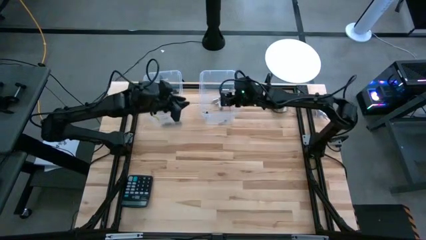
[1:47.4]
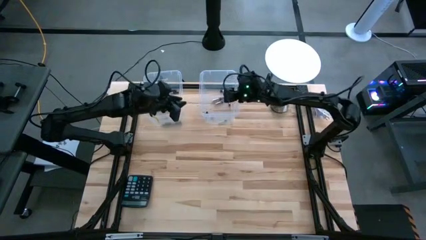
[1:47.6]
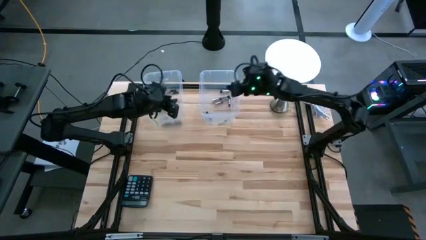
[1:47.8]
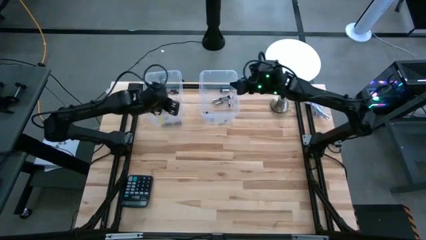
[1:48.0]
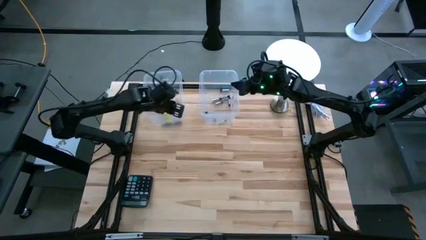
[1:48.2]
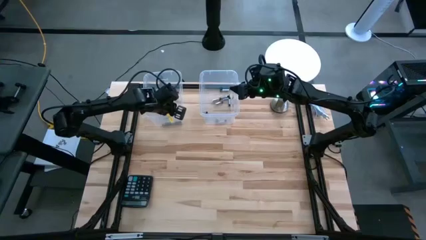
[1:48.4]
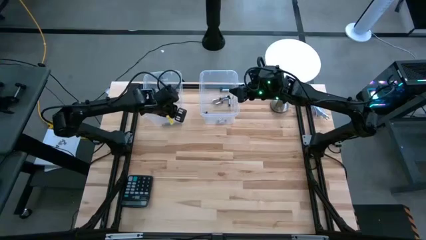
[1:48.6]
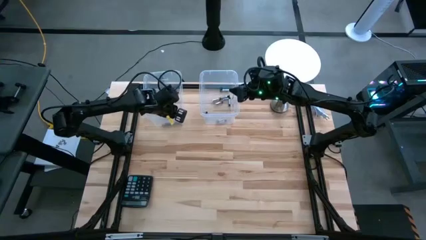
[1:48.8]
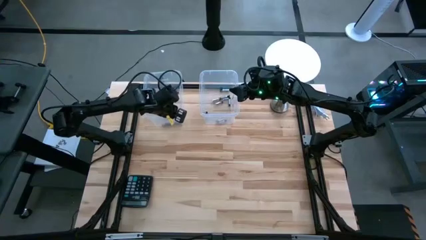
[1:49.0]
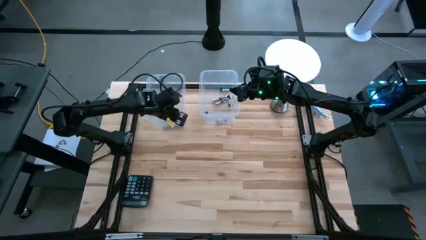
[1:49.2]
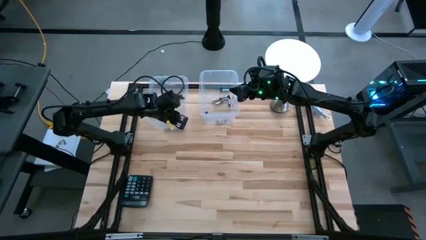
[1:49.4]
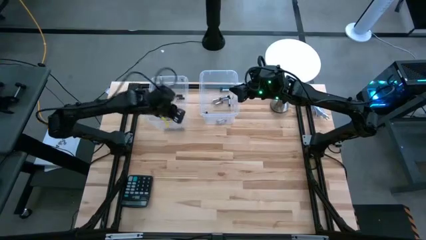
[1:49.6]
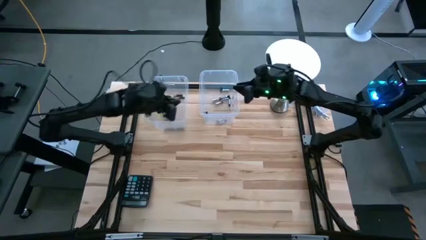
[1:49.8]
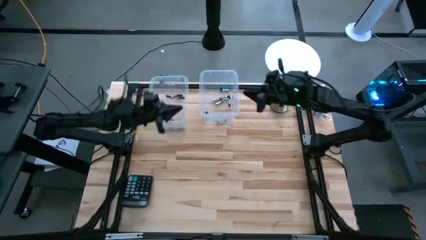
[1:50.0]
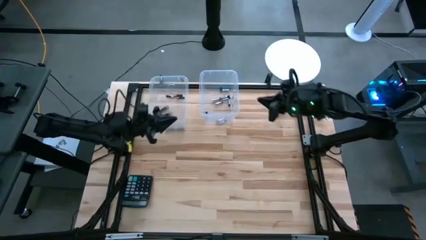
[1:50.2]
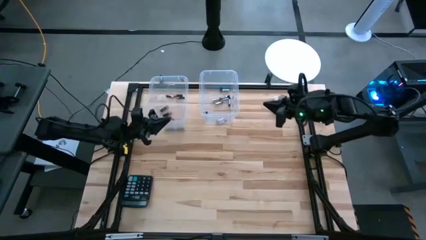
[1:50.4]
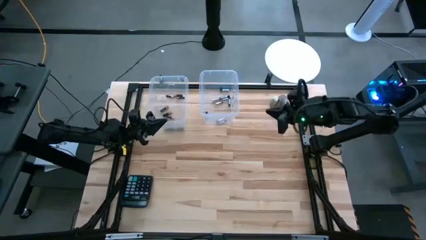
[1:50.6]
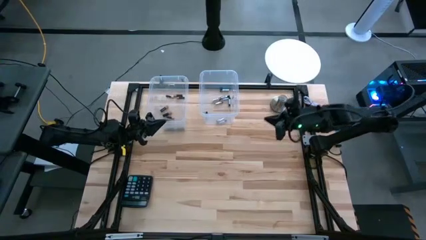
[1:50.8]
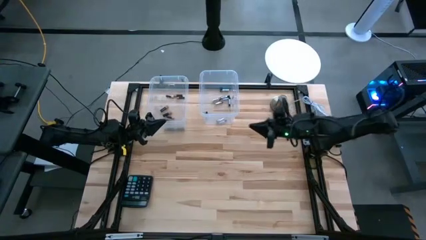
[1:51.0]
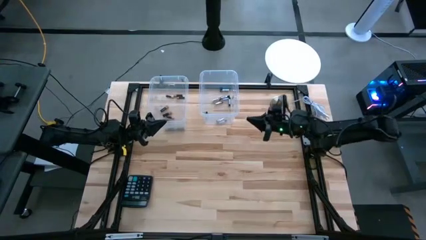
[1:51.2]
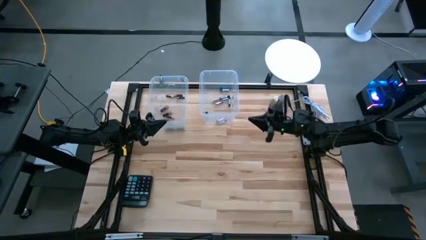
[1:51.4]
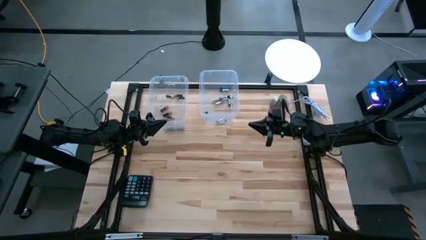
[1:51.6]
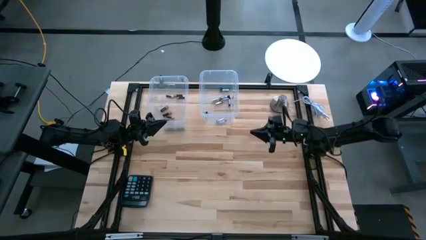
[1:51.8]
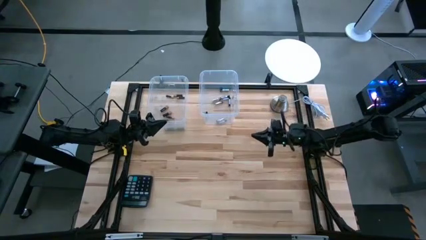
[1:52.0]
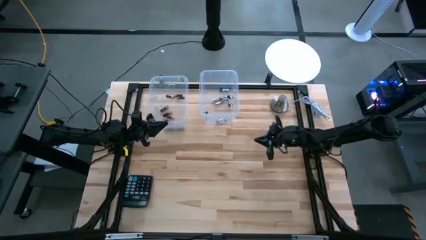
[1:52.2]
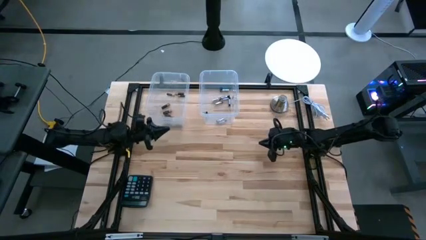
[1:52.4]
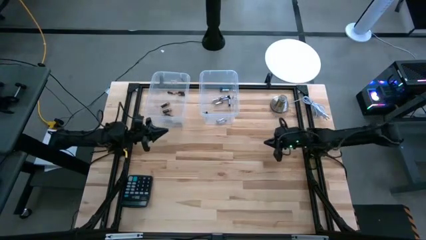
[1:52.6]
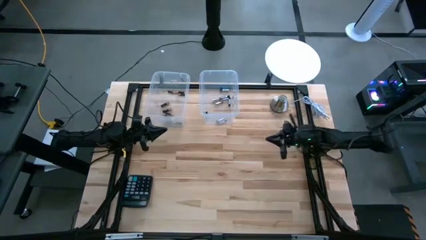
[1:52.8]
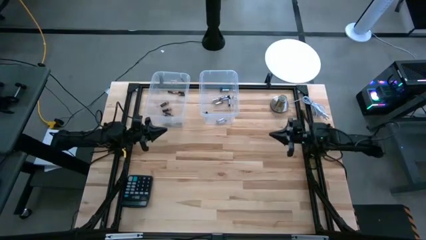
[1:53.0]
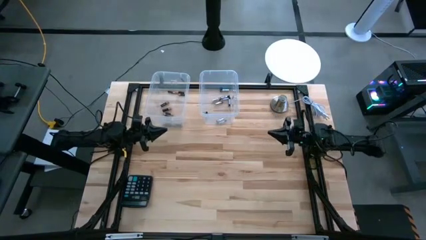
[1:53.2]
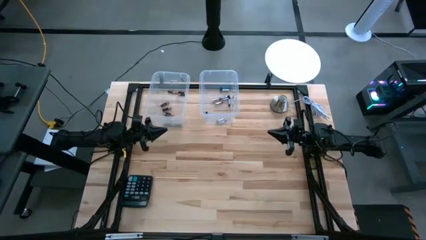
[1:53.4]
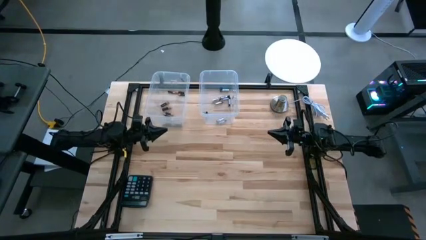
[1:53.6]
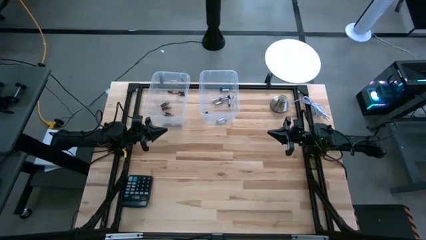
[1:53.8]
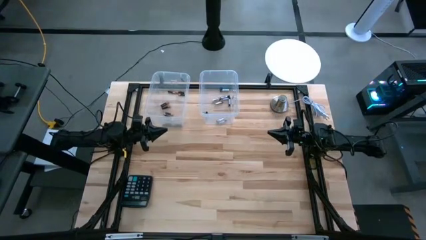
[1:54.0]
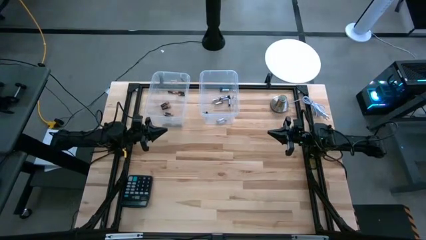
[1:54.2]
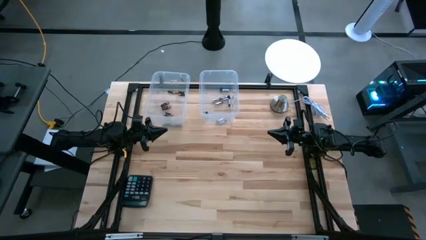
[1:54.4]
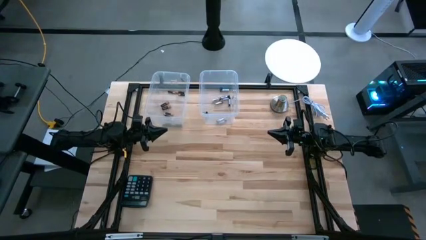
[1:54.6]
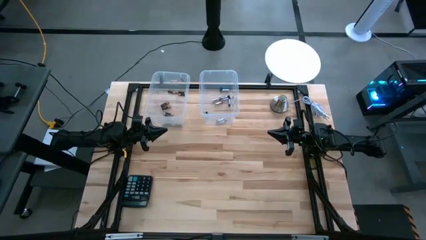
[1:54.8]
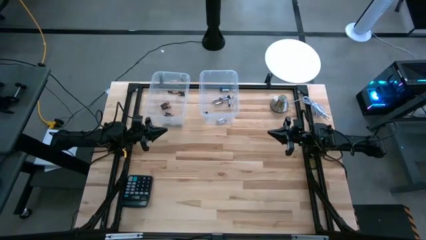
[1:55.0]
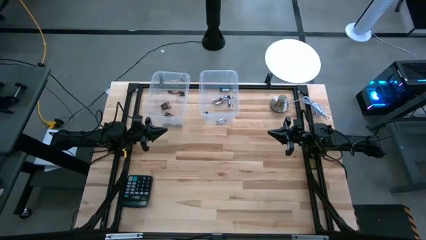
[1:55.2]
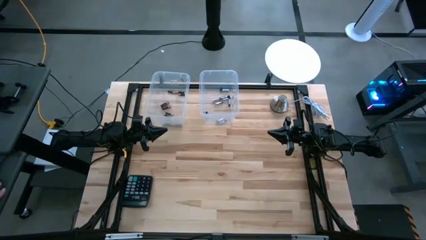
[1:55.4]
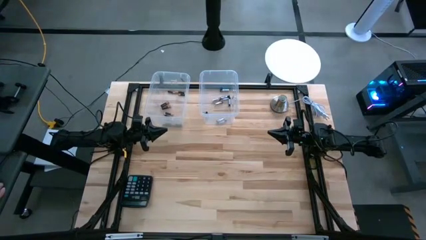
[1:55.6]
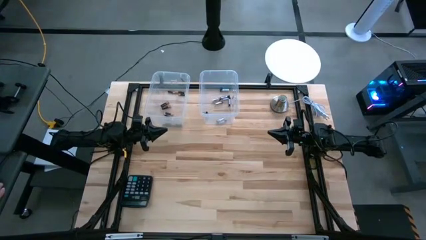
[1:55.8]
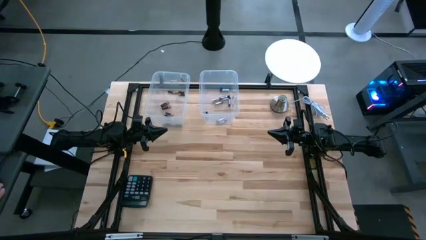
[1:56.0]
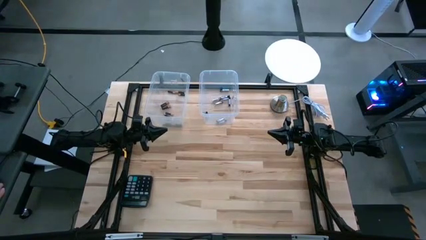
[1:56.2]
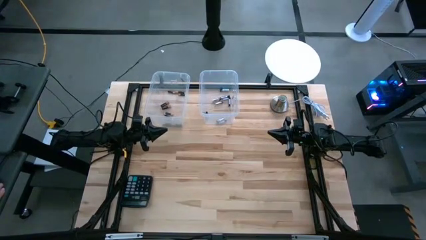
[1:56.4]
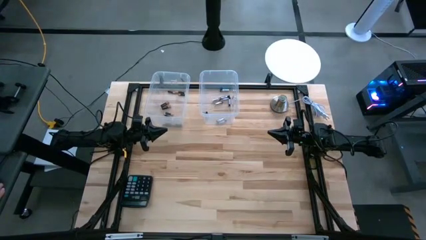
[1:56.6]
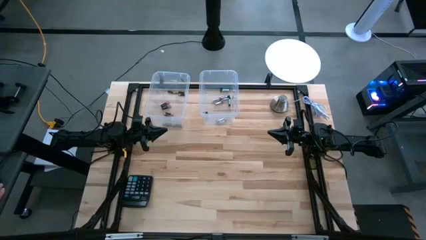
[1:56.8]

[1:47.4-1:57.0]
Task: Sort batteries
Return to Home Position

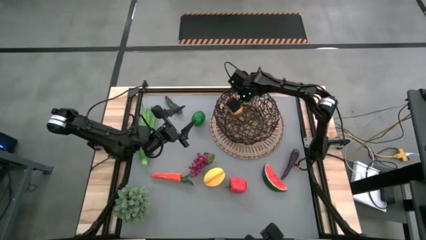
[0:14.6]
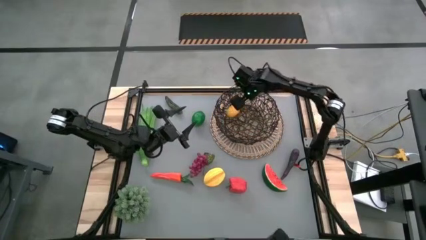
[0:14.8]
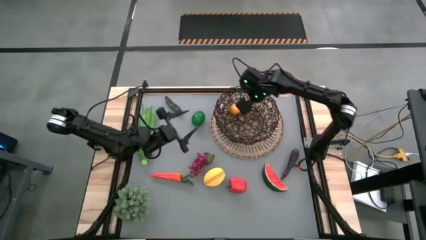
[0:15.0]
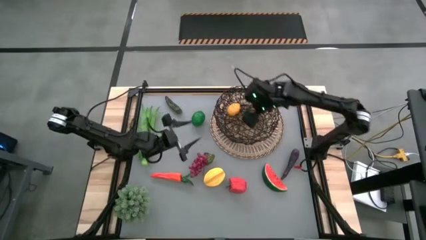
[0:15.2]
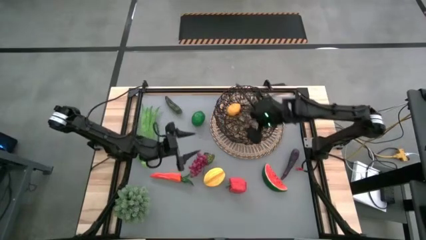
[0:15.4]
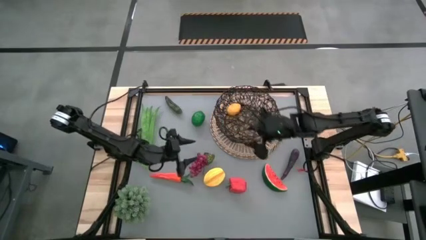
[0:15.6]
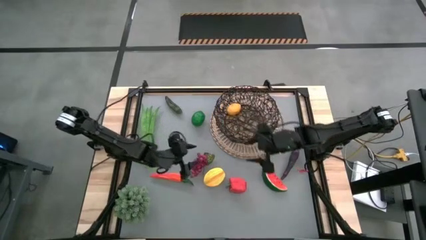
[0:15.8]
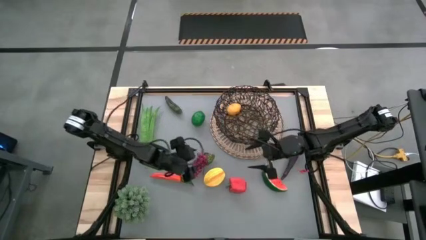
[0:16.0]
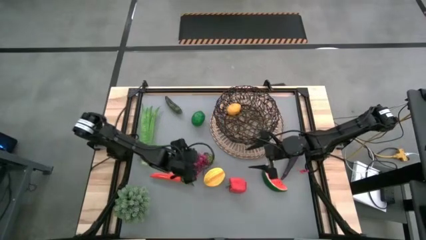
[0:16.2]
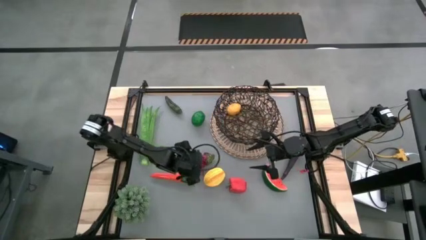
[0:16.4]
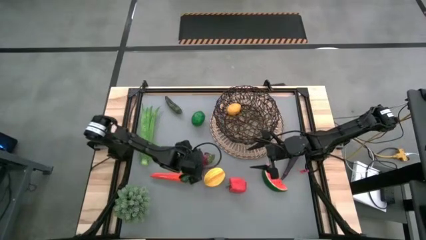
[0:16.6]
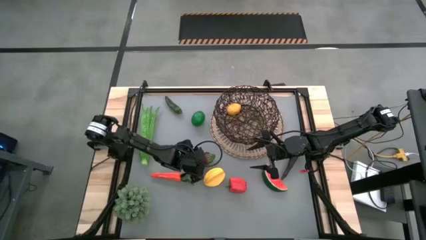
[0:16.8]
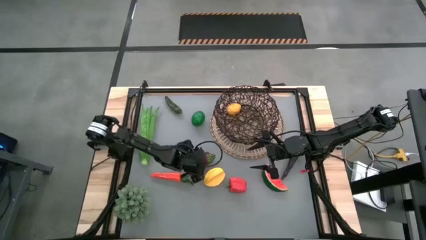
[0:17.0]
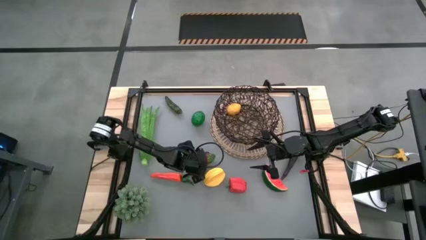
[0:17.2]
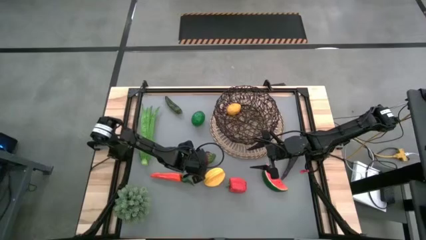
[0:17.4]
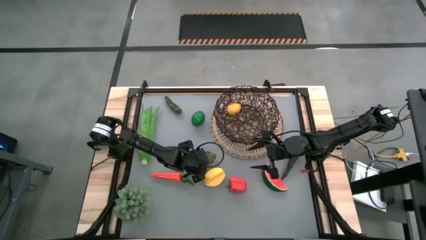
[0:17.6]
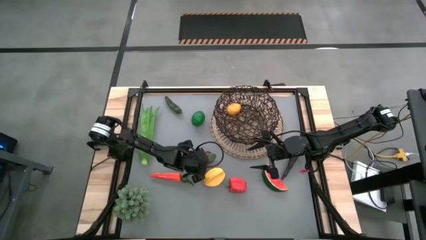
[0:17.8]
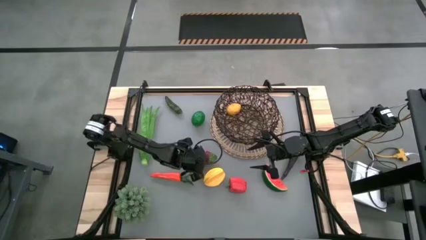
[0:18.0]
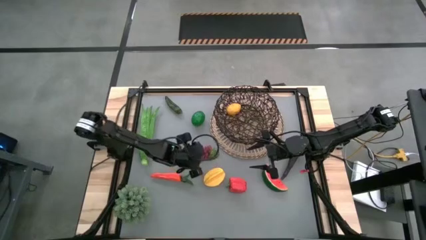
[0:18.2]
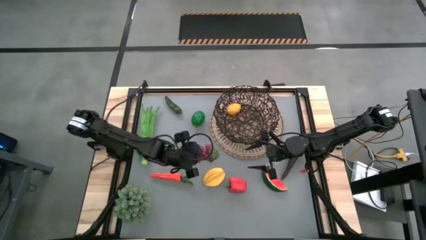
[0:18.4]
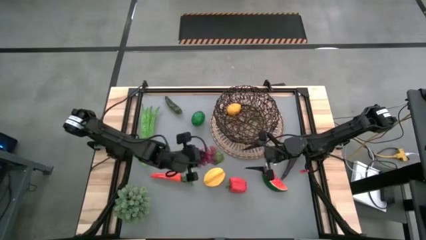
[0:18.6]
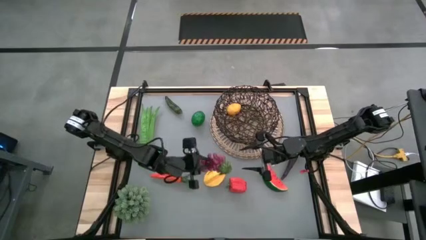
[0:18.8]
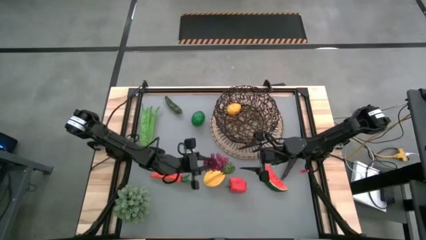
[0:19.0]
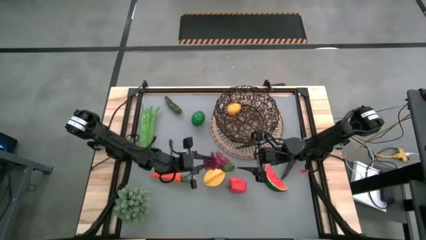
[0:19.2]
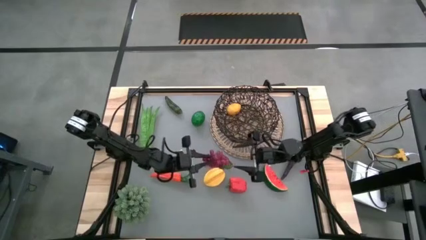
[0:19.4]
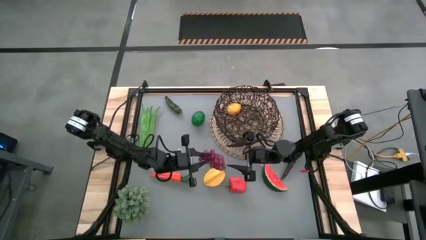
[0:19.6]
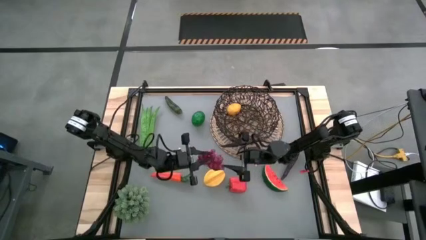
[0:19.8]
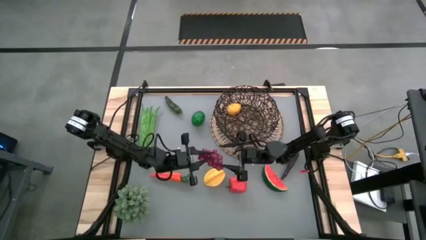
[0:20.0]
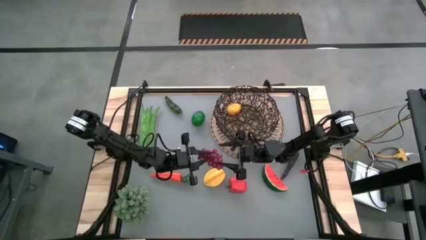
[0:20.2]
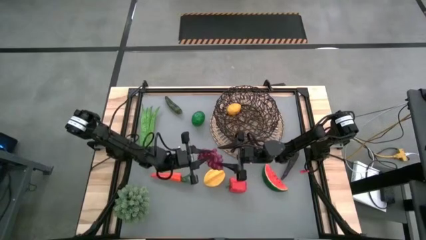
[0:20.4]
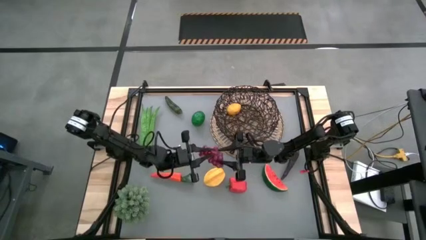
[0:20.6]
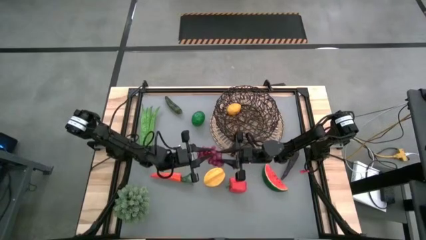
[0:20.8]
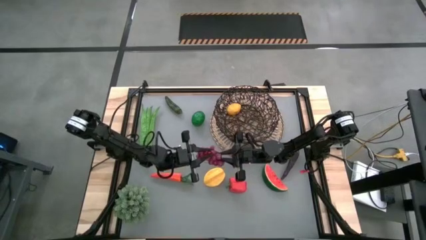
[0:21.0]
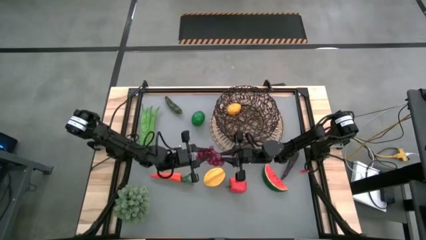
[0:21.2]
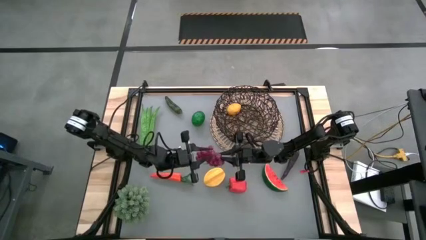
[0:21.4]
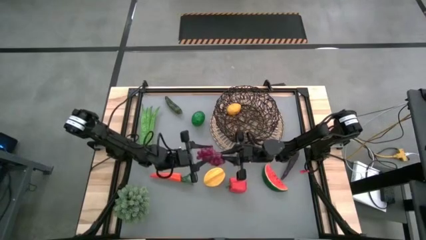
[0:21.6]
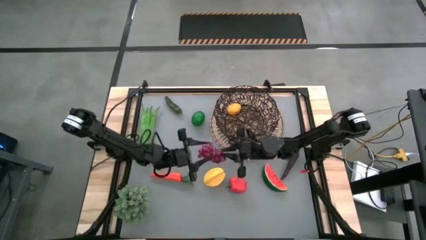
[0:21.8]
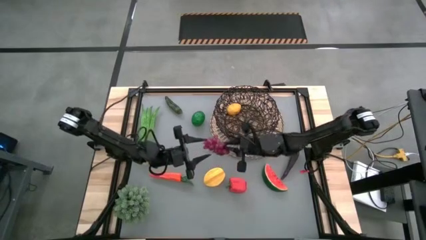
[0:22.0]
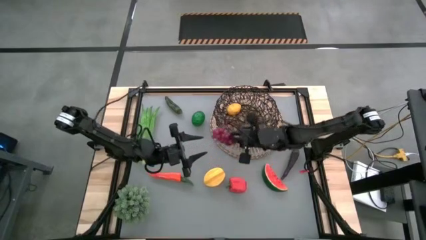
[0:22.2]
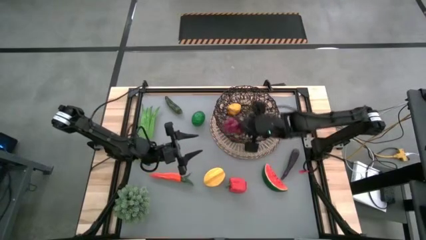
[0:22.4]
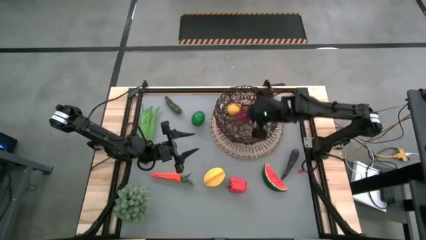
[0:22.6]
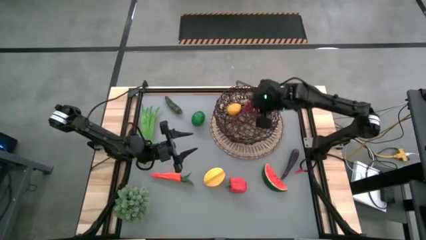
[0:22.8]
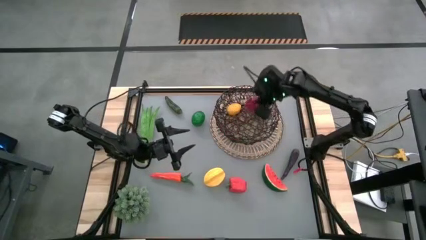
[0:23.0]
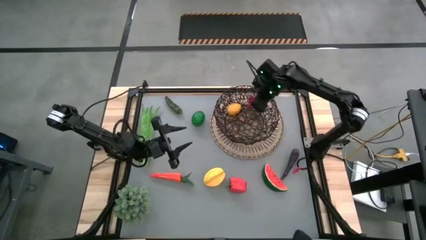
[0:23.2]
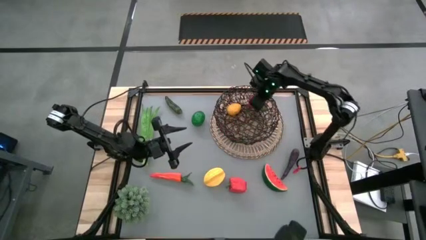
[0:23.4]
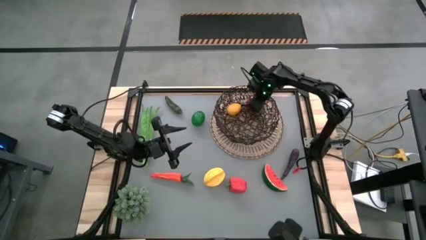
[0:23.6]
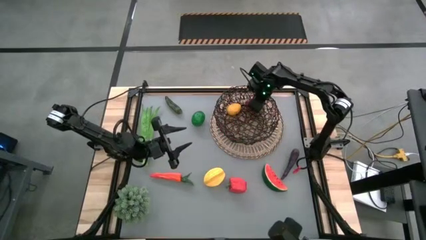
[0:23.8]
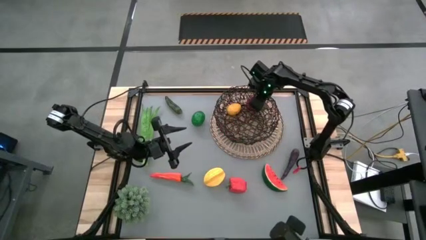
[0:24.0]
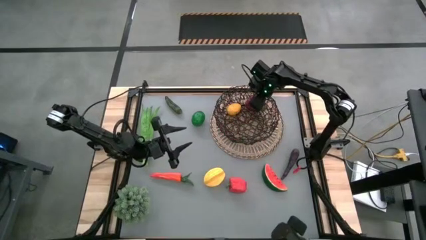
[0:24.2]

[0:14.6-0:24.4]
Task: Build produce basket
Put the violet grapes into the basket
